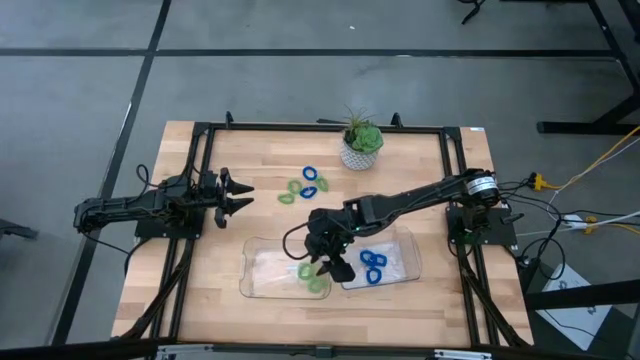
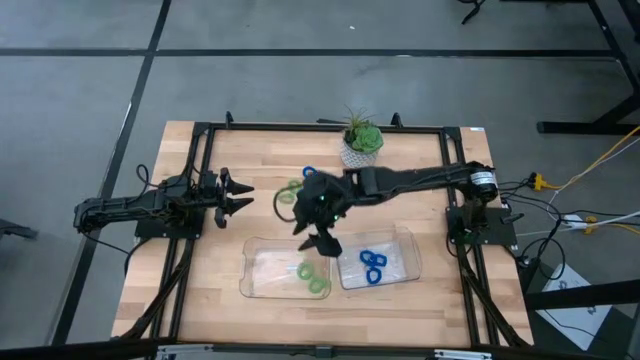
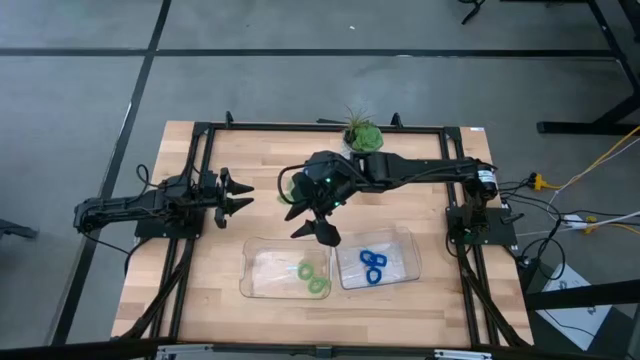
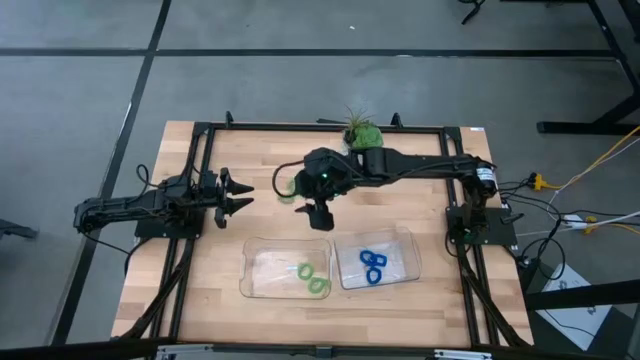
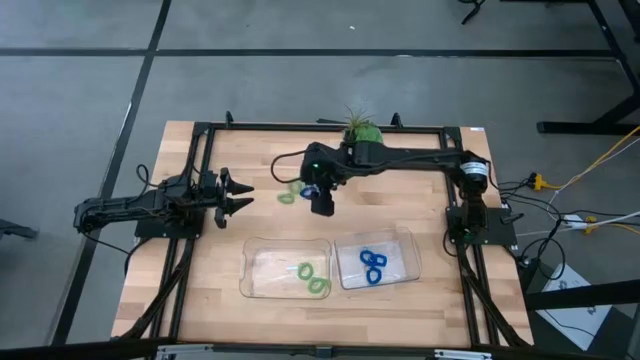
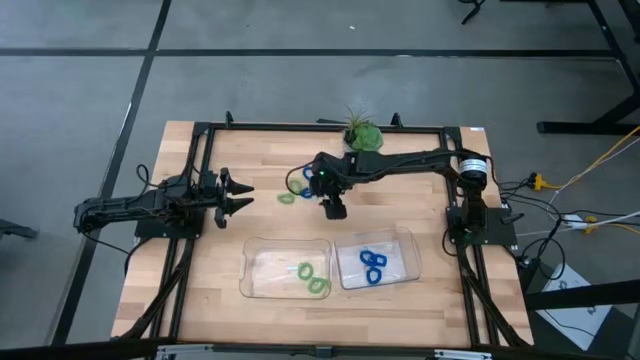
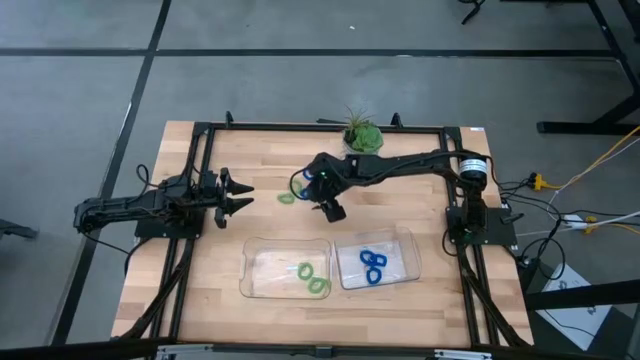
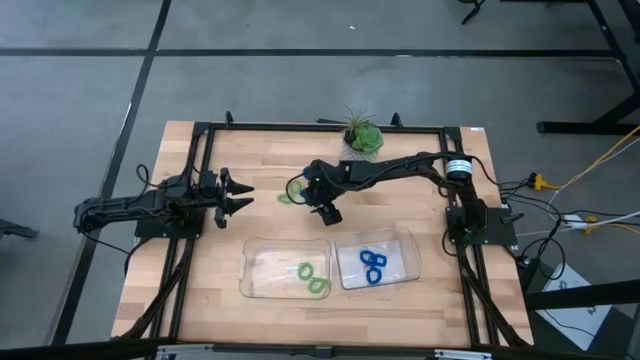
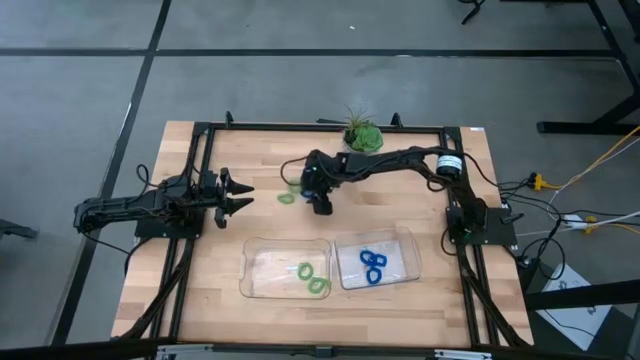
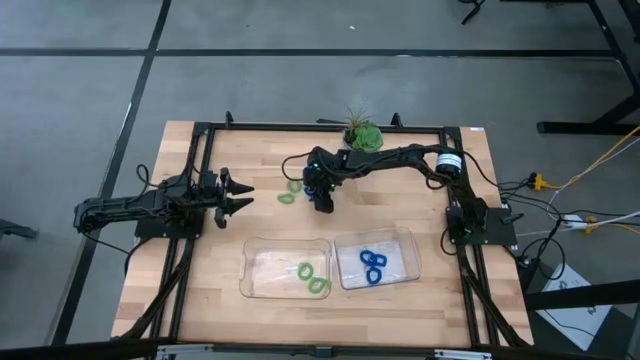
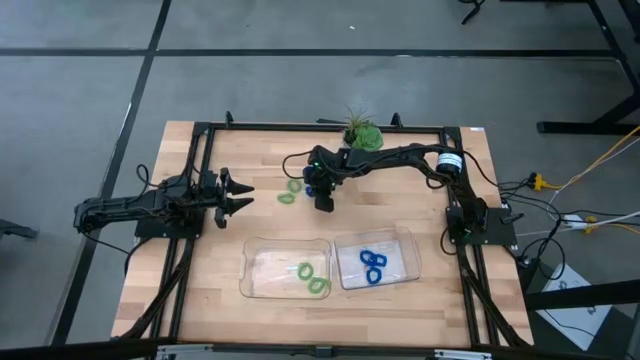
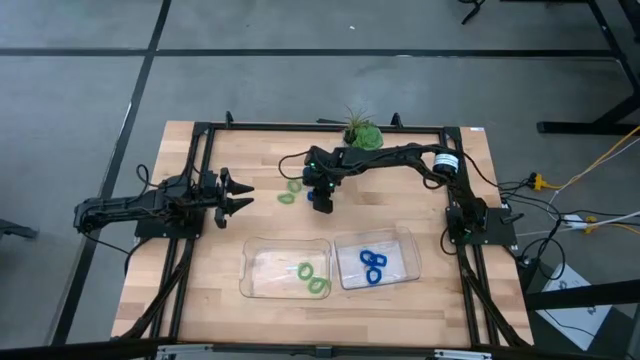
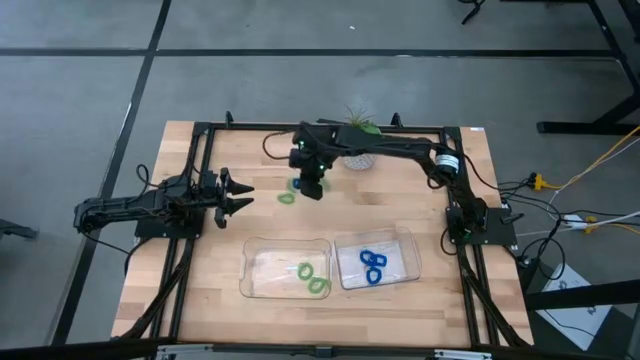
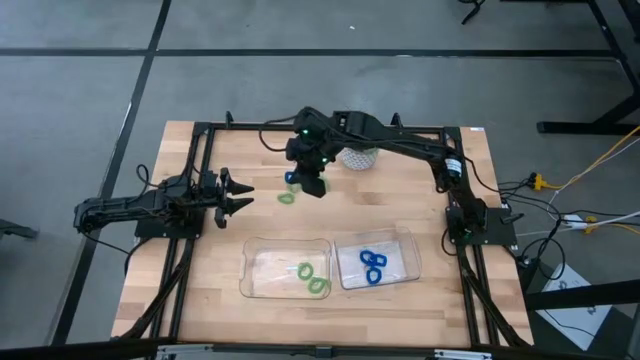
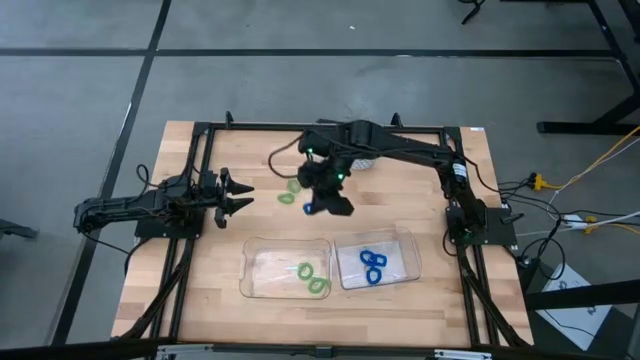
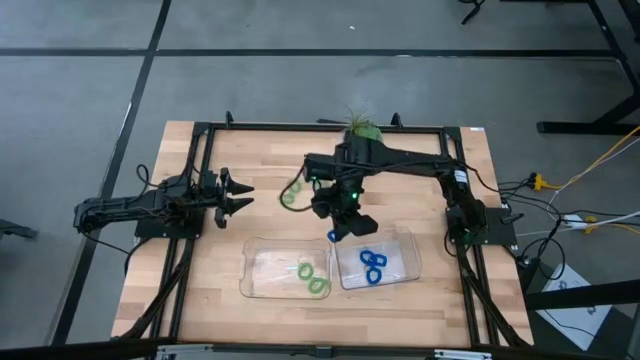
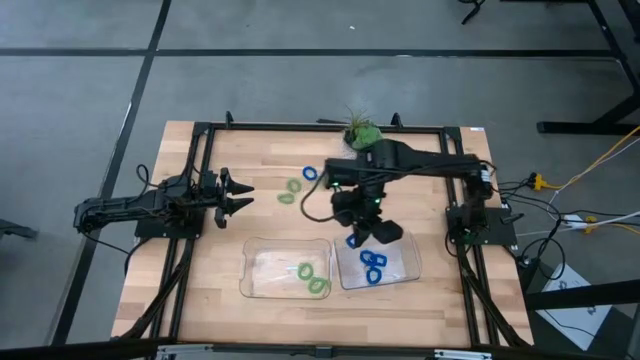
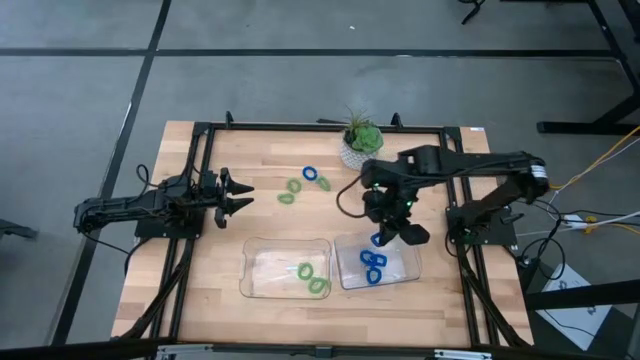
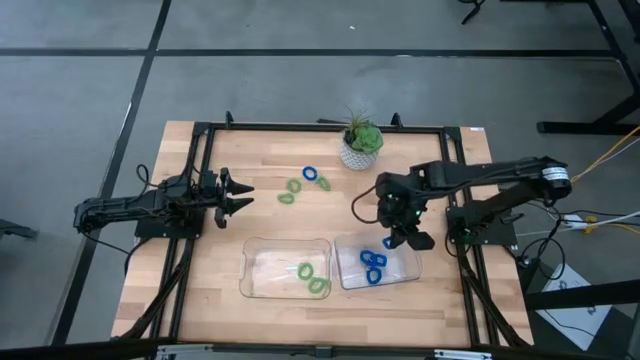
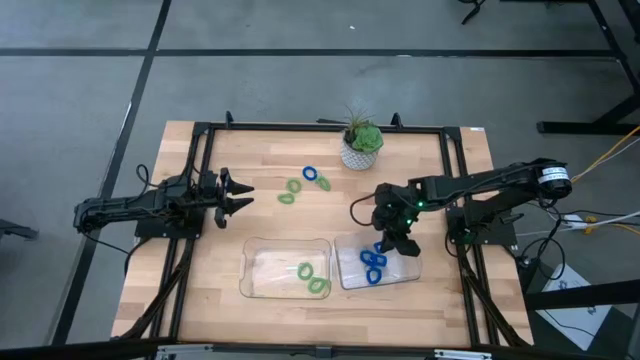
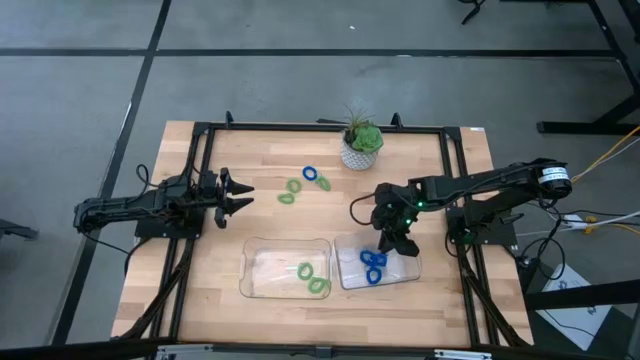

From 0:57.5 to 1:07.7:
Task: Sort spring keychains
Put the blue spring keychain into the right transparent bin

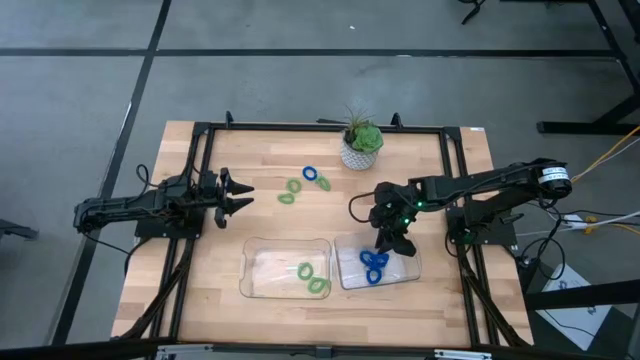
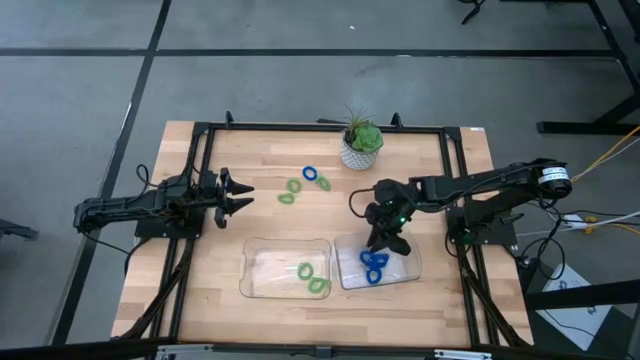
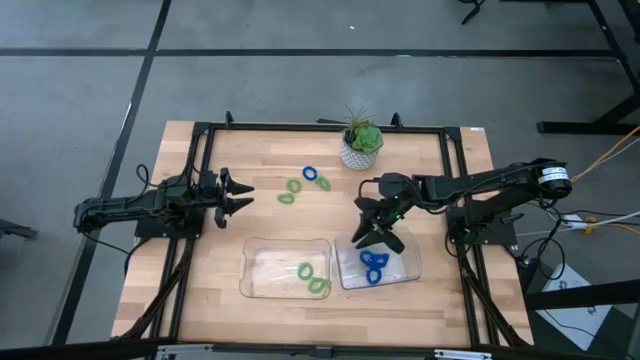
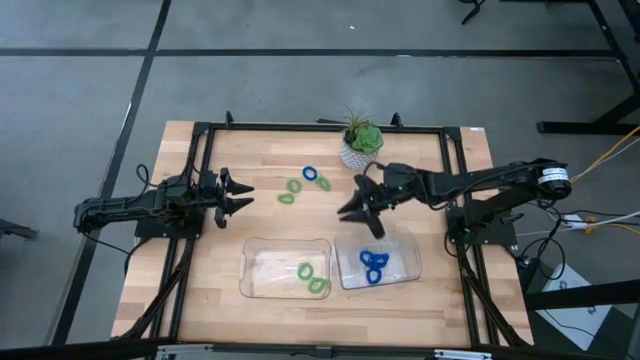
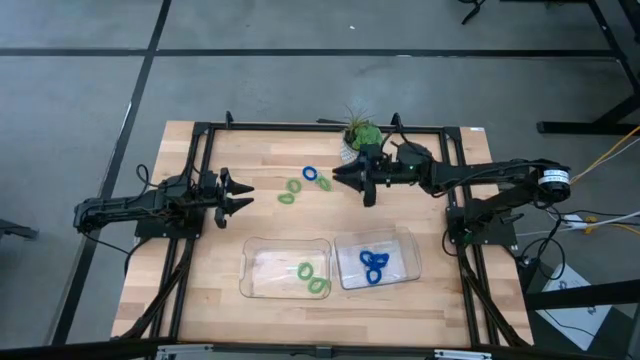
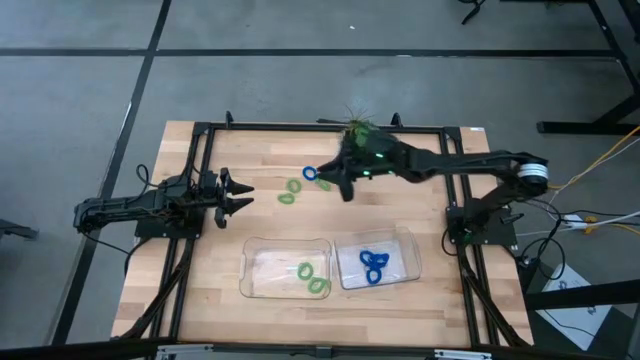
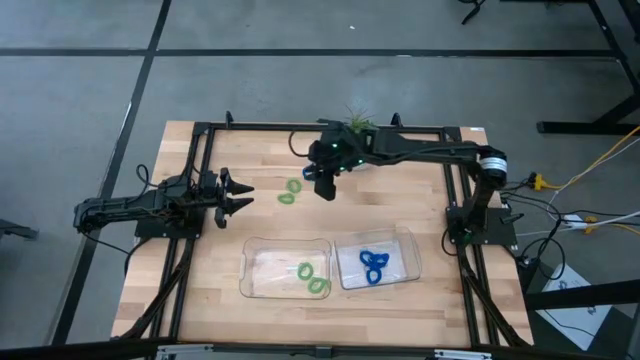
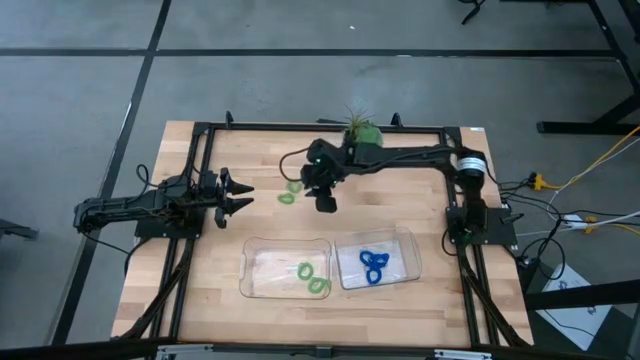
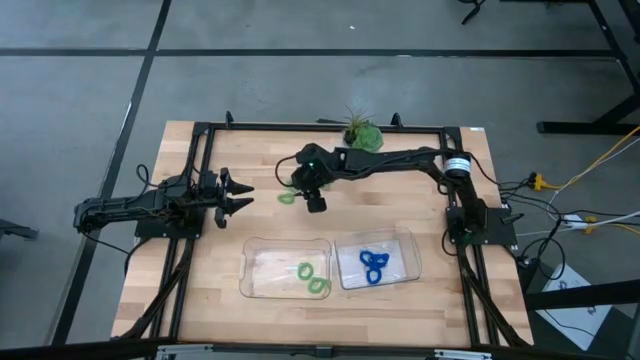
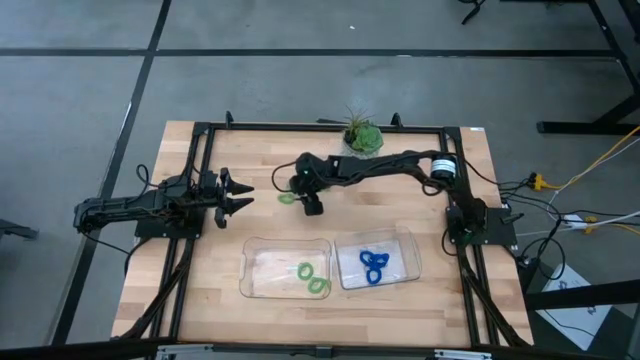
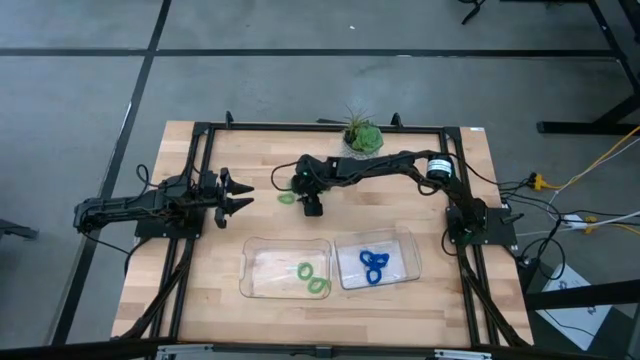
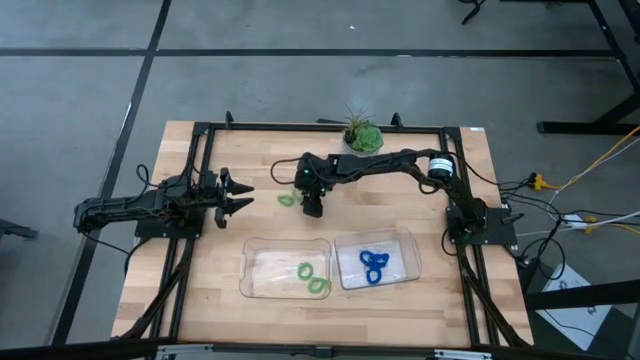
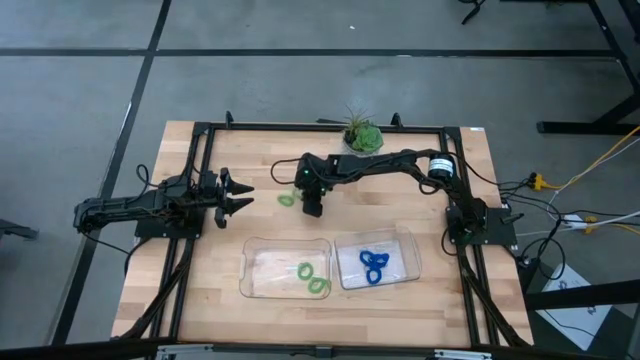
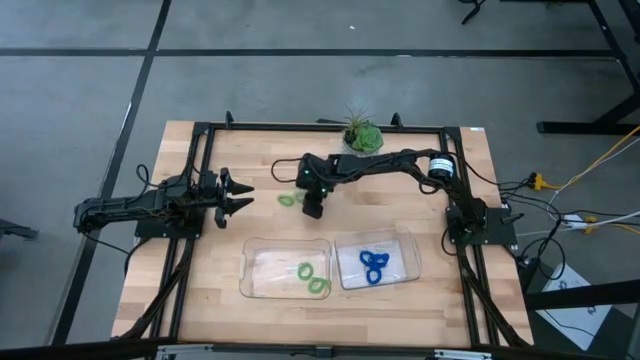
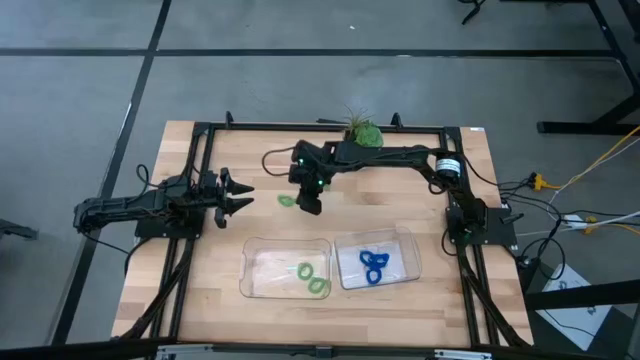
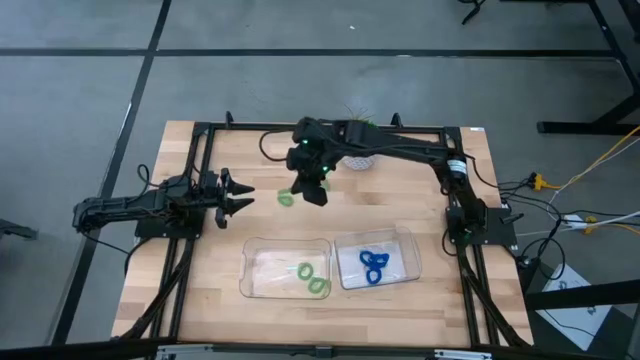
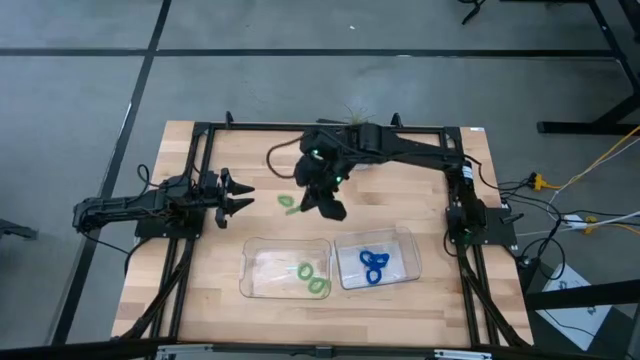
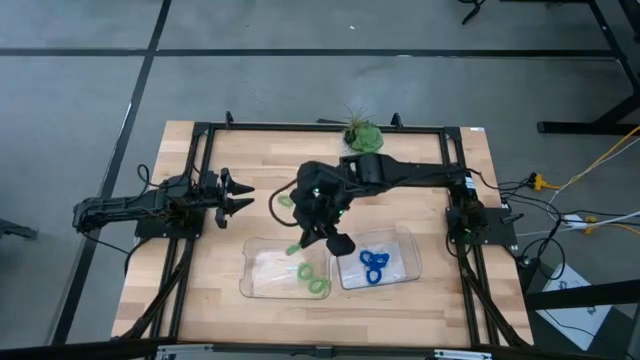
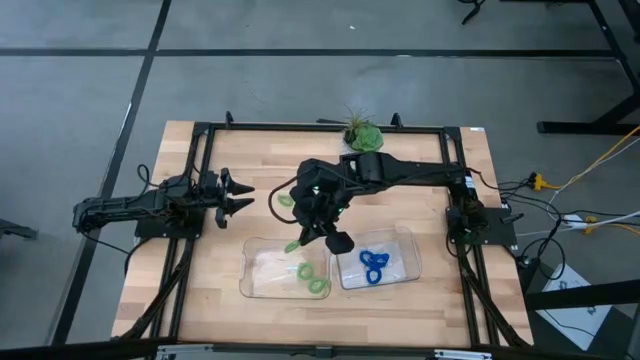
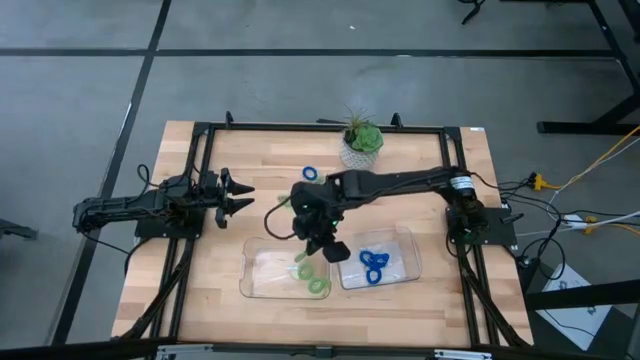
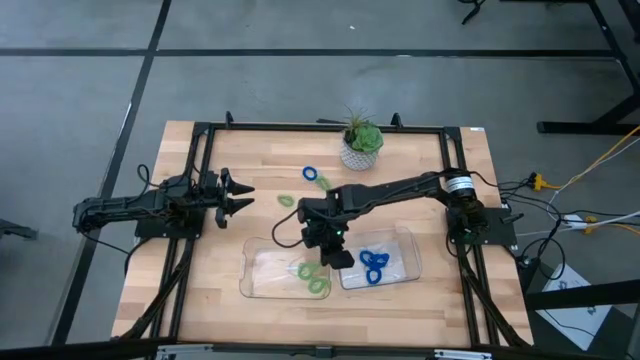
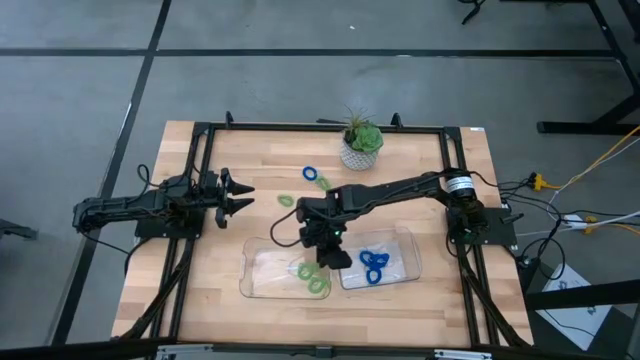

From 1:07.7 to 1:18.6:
Put the green spring keychain into the left transparent bin
